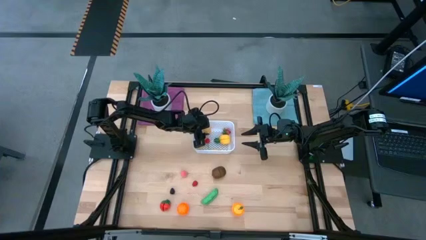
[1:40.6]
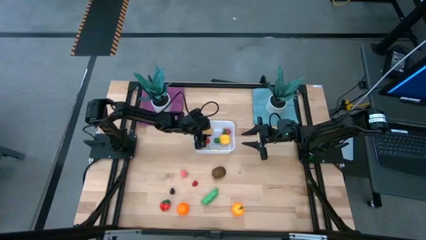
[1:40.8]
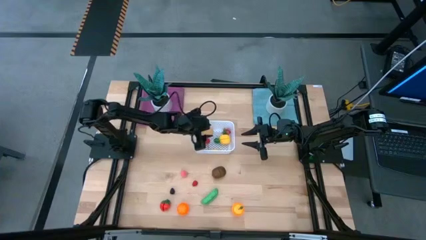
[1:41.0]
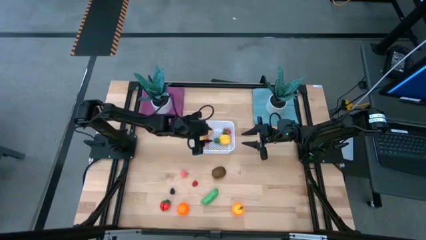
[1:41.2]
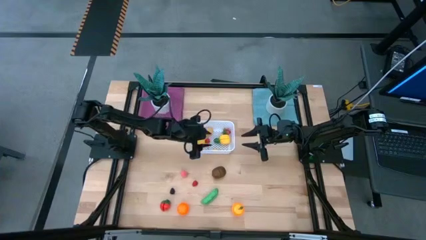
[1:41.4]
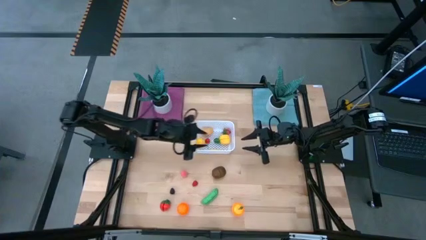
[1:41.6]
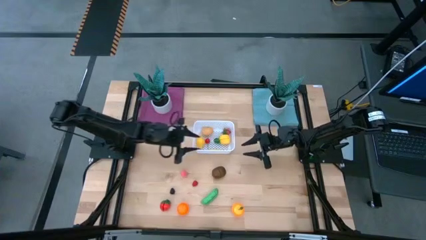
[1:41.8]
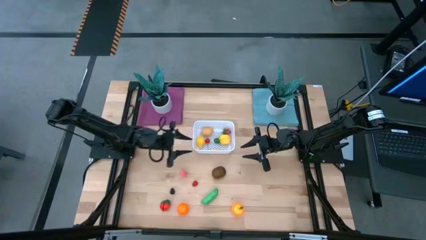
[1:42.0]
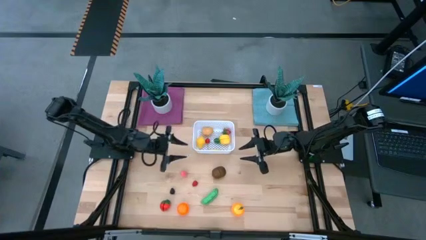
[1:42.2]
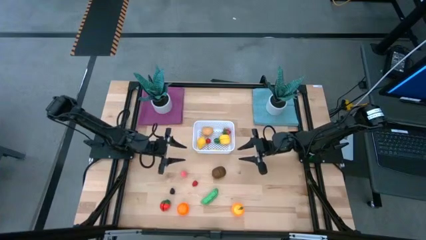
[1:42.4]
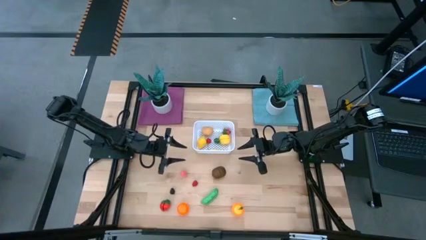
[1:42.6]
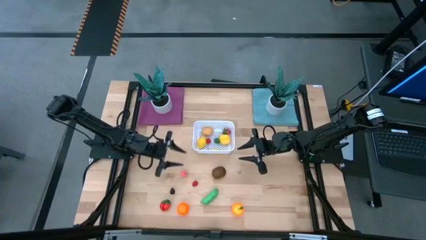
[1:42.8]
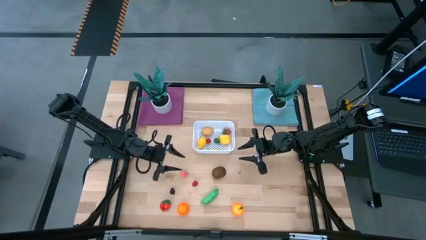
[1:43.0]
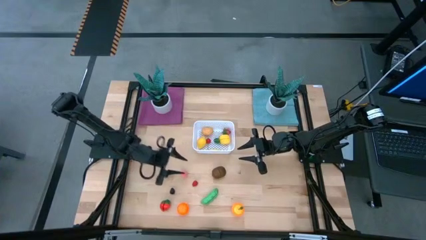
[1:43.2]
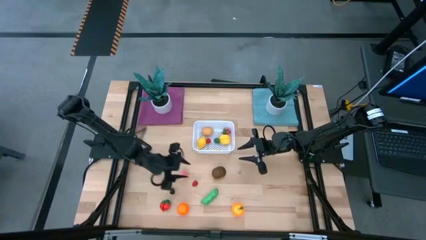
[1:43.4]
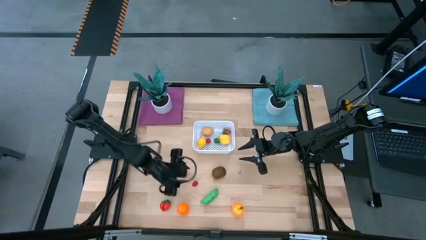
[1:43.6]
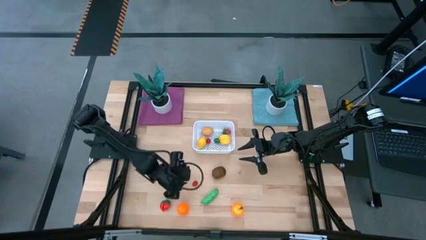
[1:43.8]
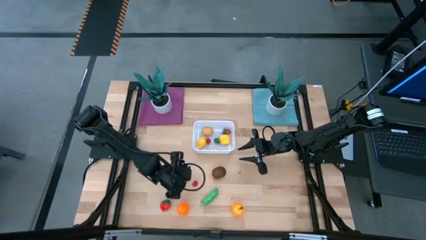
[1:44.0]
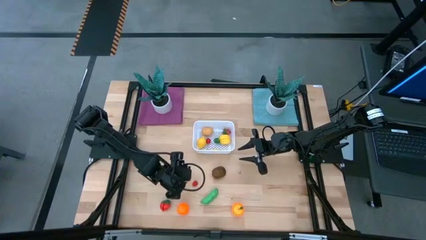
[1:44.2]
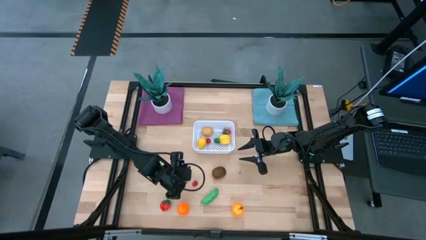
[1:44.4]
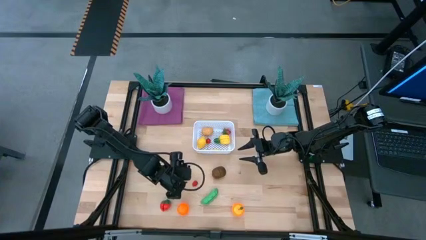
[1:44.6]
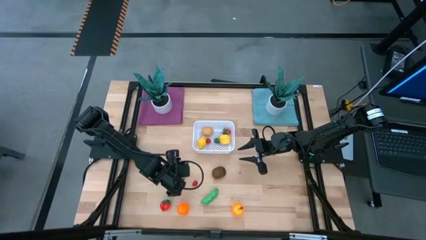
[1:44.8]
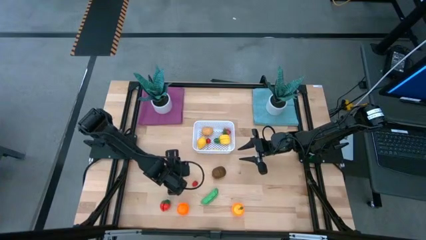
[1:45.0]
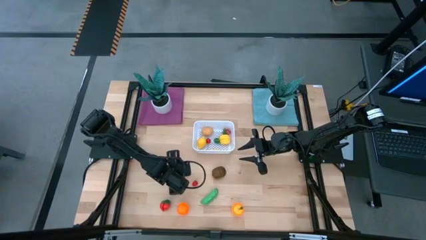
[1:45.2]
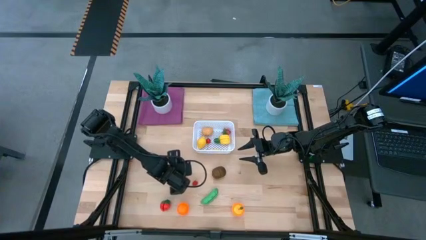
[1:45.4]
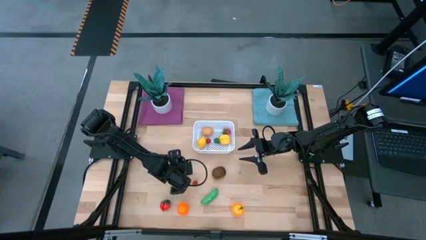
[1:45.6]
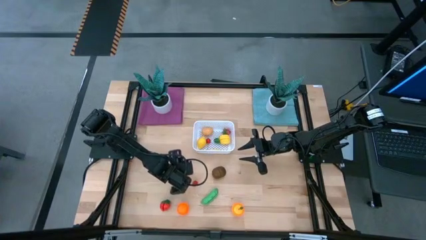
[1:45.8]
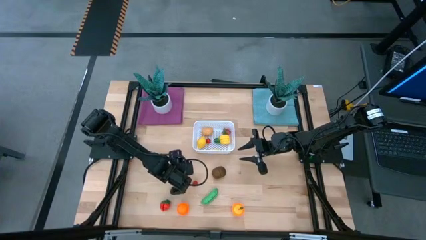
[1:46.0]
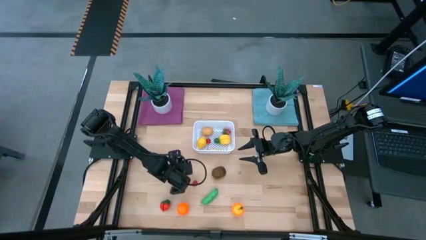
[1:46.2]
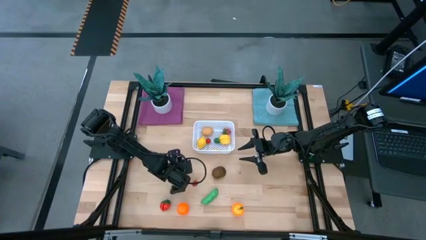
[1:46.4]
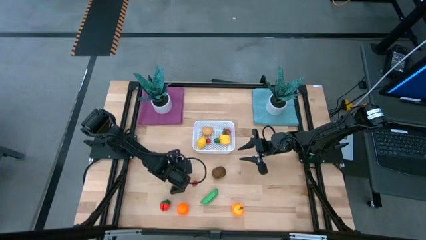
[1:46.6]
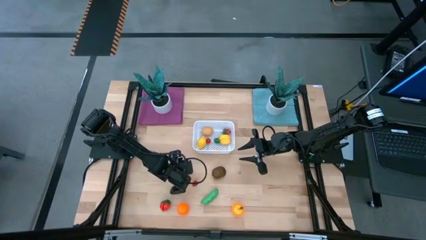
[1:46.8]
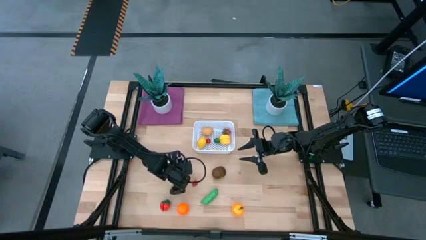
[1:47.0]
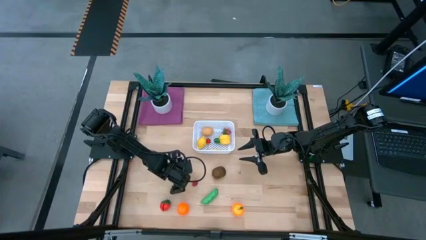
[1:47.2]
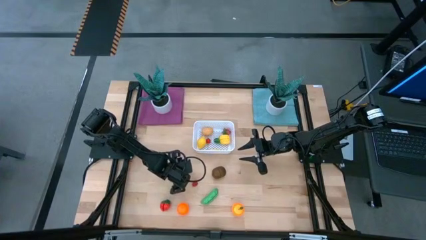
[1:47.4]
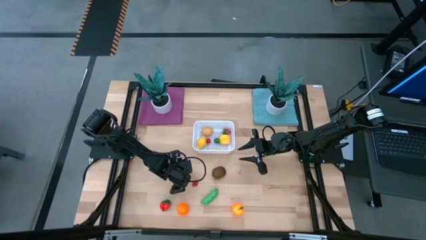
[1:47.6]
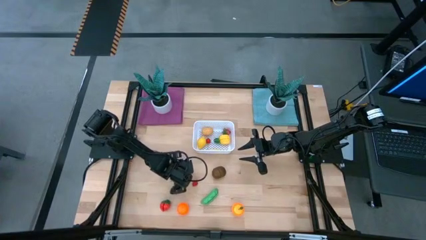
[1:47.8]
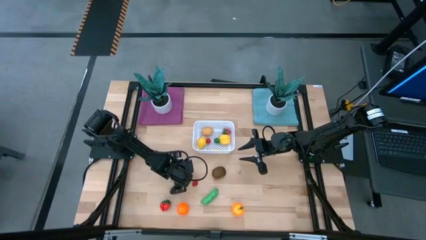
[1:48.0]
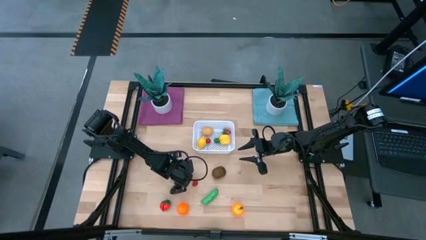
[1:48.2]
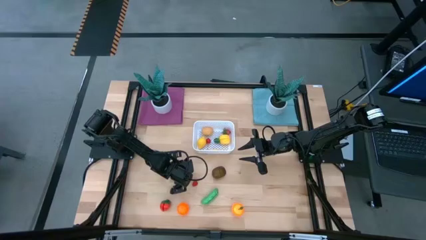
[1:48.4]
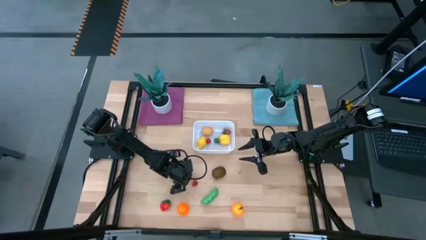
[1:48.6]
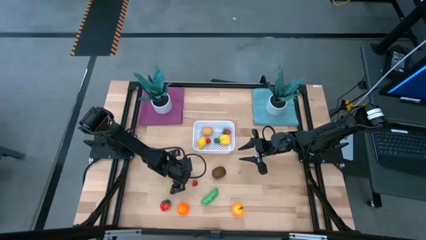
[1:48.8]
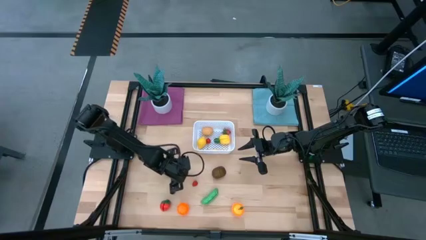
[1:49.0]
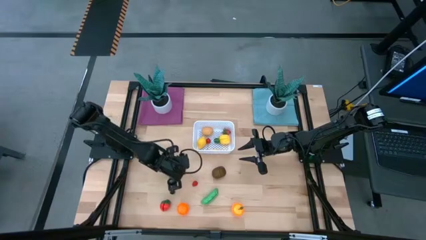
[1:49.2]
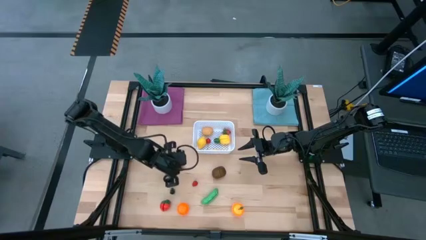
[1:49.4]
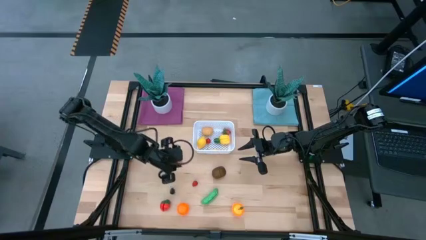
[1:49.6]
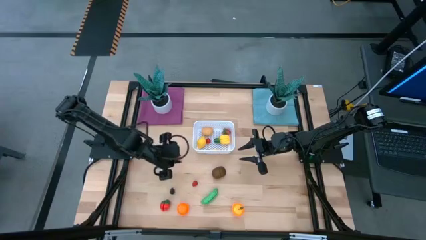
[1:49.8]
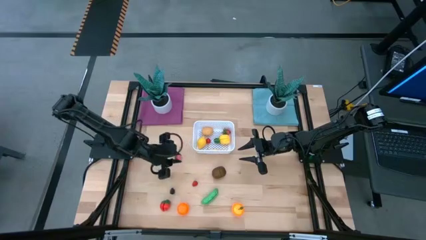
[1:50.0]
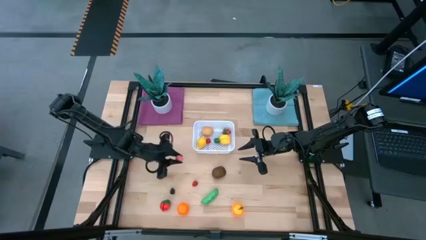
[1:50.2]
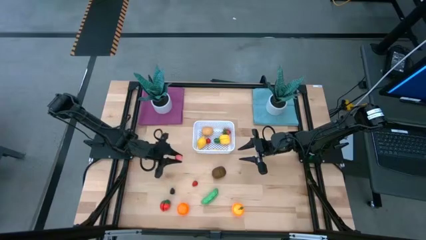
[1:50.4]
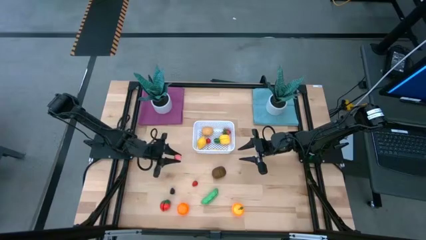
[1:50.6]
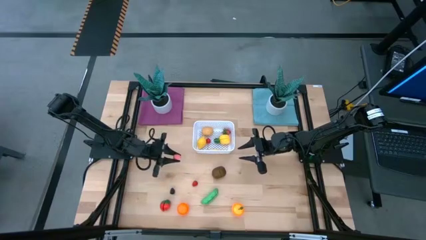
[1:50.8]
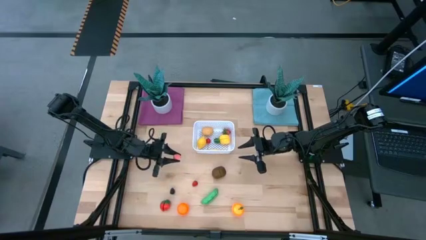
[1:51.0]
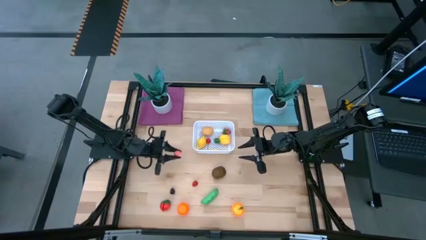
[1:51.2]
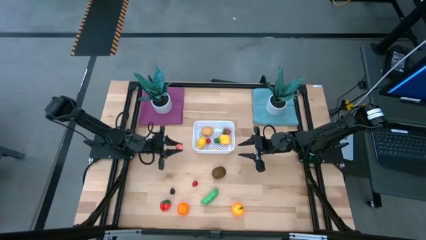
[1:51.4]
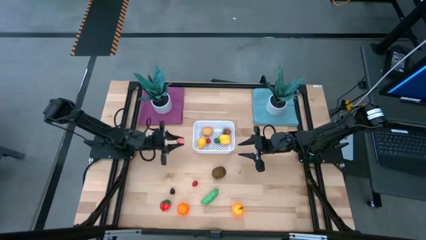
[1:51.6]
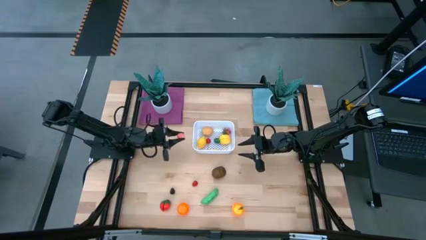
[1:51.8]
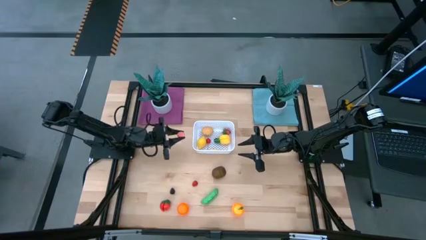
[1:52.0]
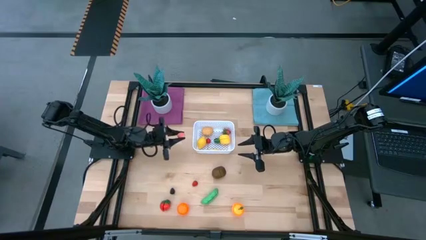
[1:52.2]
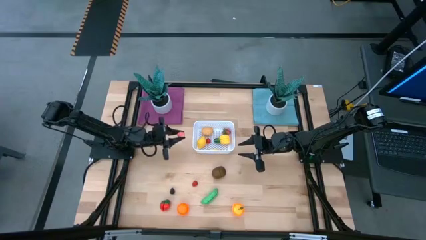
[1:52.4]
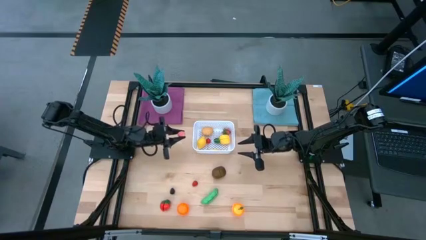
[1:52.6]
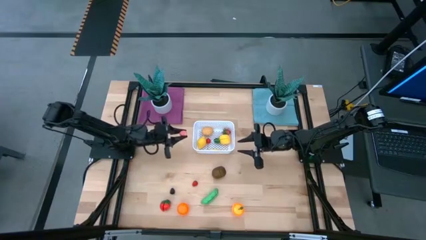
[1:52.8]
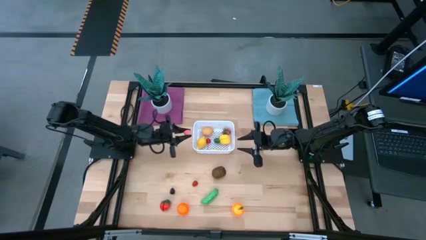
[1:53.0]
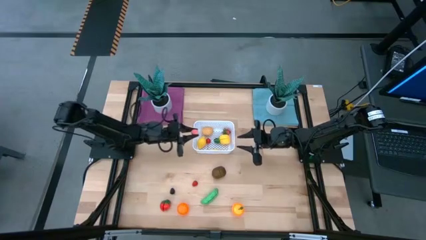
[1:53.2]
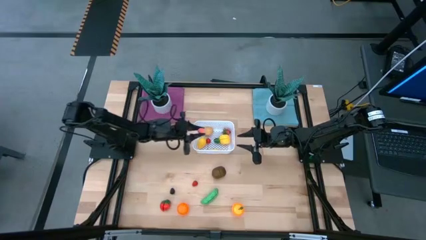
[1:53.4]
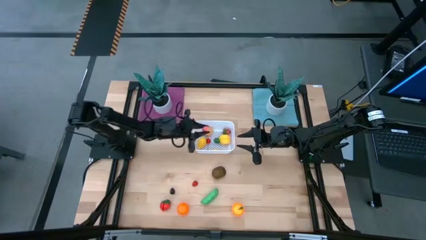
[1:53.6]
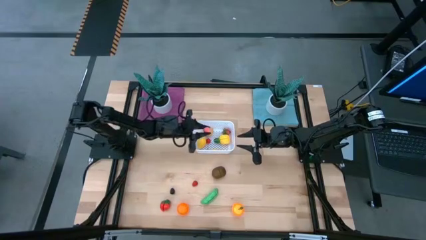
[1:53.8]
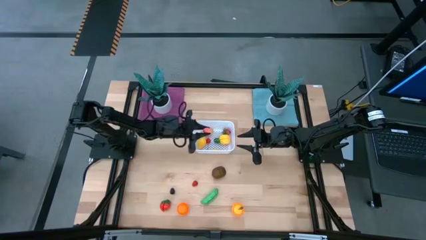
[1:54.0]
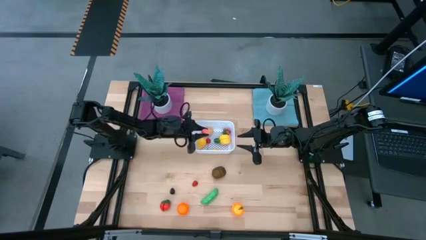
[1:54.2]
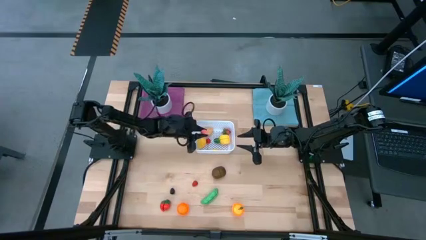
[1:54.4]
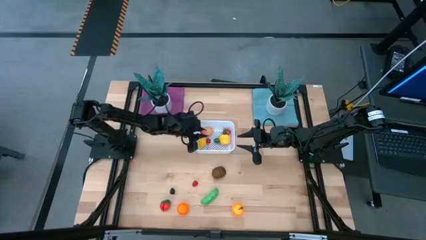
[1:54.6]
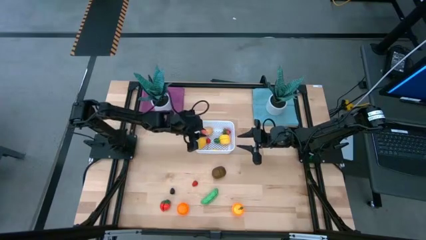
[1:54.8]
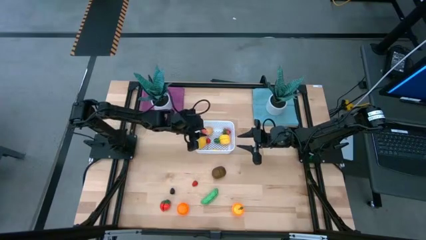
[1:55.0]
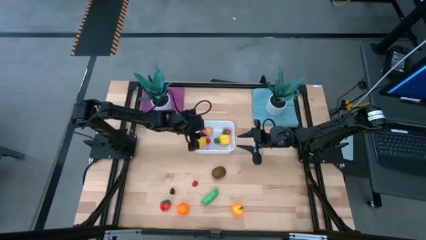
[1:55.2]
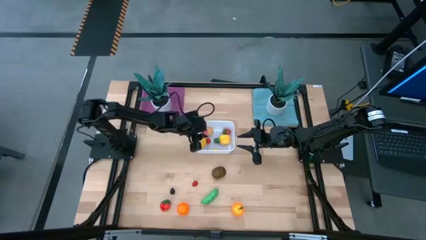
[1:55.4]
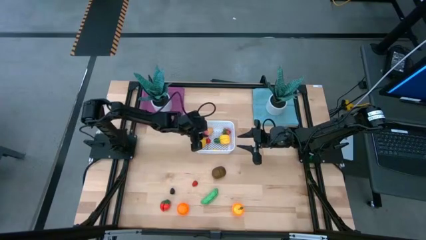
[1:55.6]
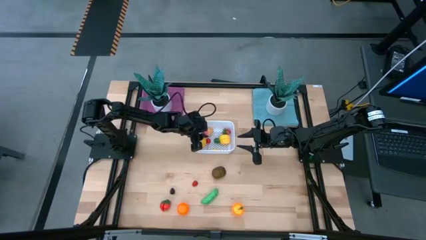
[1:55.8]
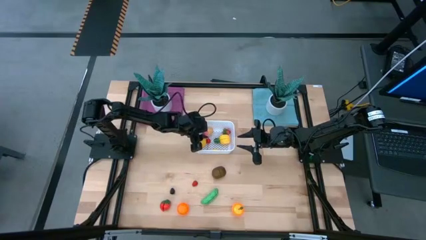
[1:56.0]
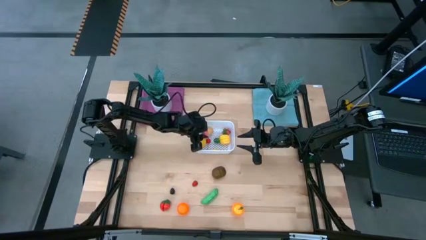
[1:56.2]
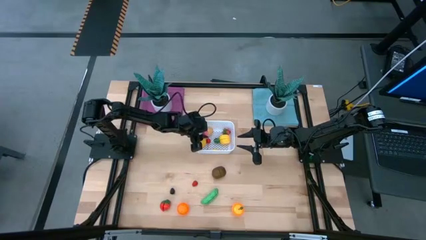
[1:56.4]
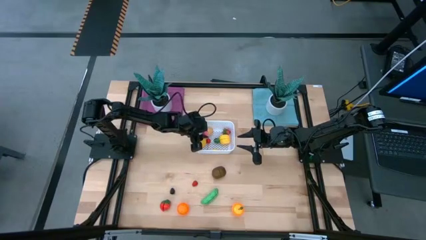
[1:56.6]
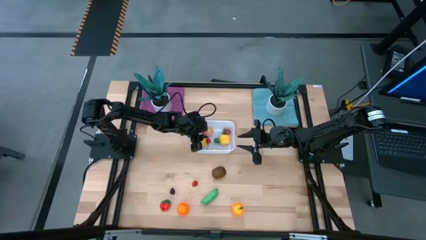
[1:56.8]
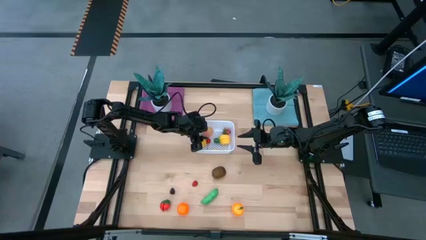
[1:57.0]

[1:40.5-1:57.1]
Task: Pick and placing Produce into tupperware
Put the pink peach into the white bin
